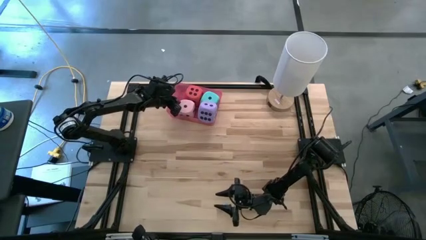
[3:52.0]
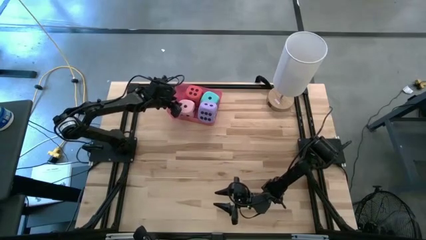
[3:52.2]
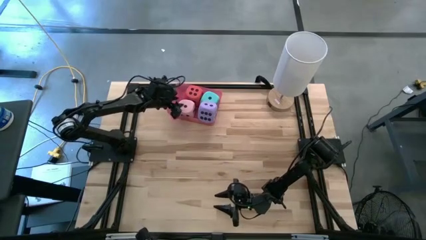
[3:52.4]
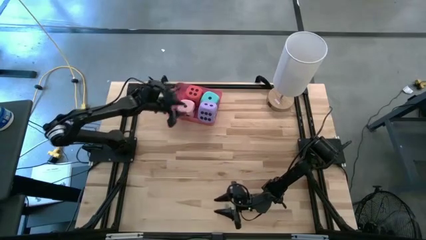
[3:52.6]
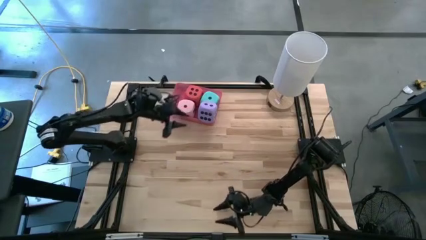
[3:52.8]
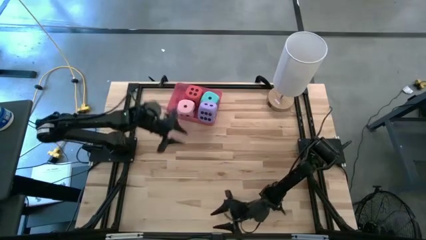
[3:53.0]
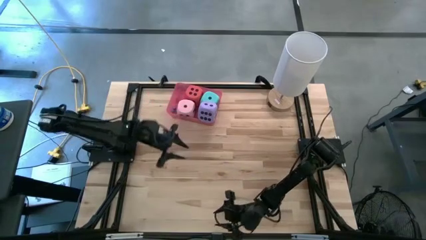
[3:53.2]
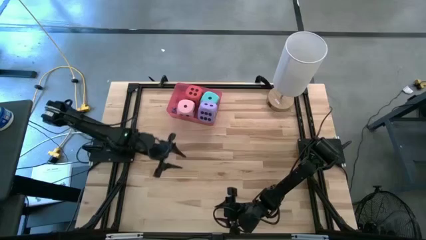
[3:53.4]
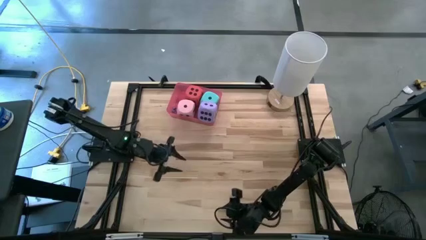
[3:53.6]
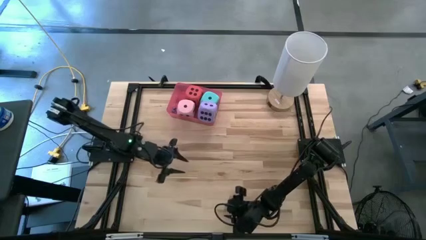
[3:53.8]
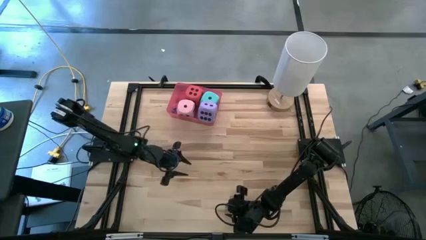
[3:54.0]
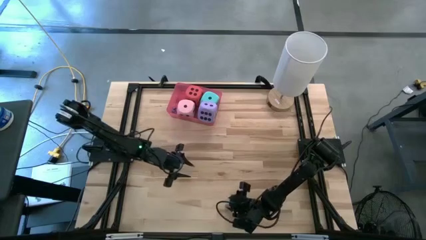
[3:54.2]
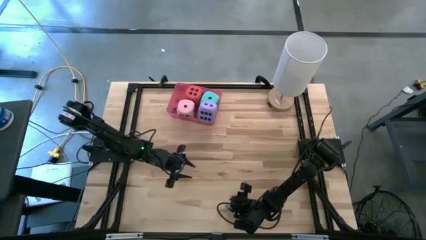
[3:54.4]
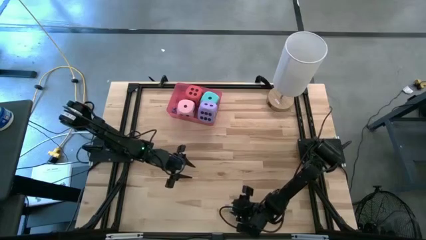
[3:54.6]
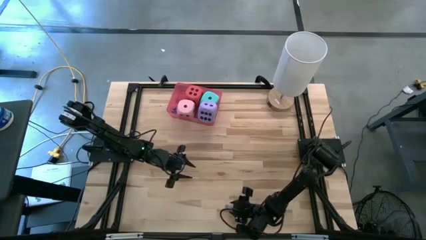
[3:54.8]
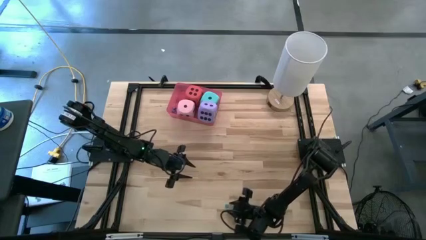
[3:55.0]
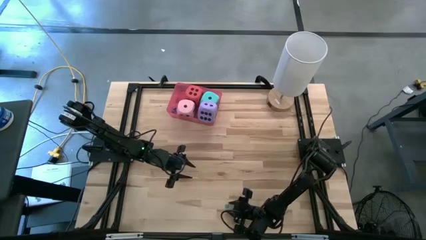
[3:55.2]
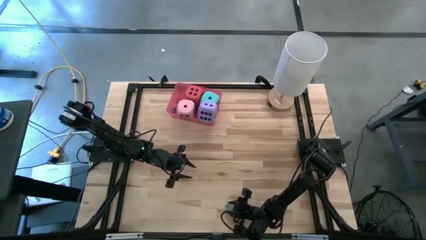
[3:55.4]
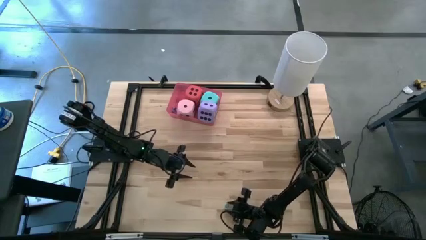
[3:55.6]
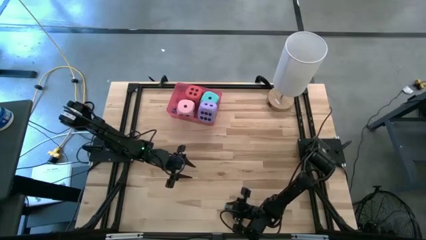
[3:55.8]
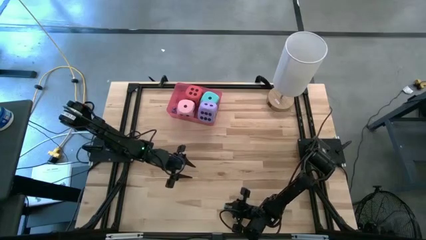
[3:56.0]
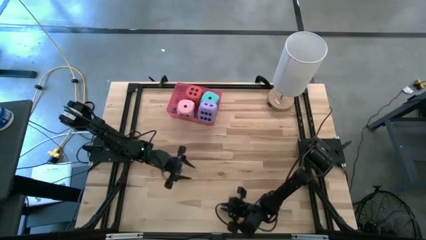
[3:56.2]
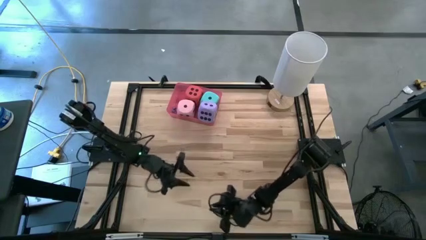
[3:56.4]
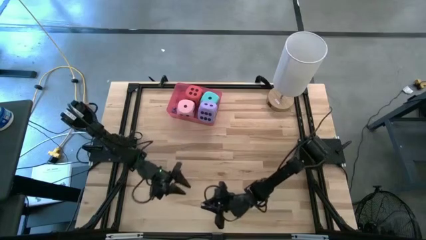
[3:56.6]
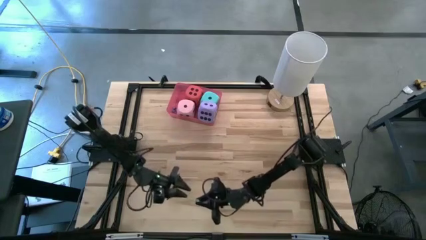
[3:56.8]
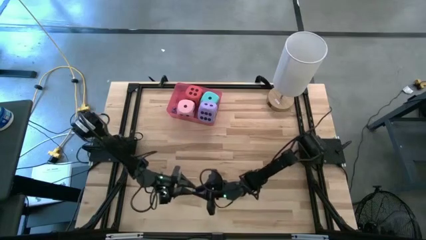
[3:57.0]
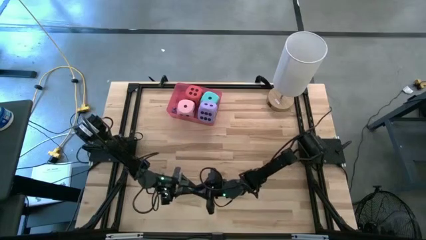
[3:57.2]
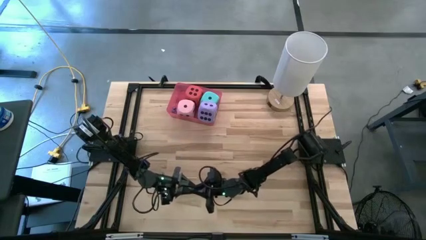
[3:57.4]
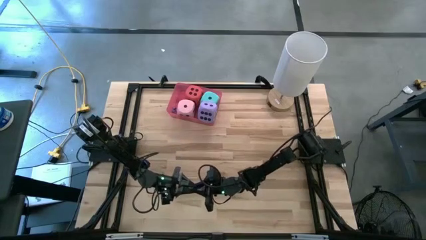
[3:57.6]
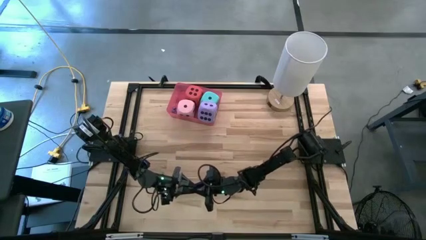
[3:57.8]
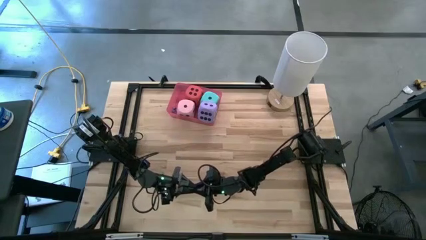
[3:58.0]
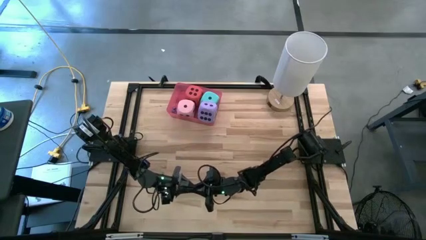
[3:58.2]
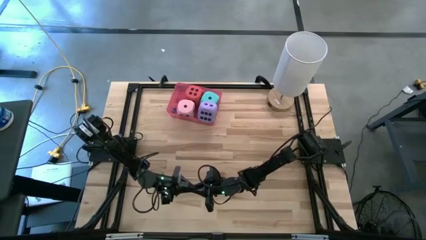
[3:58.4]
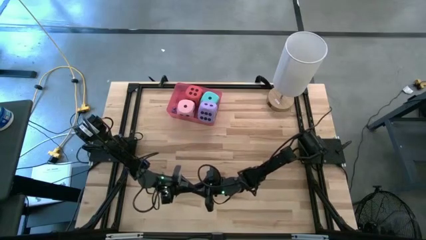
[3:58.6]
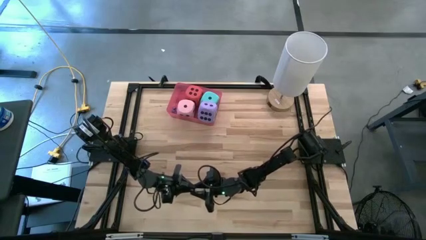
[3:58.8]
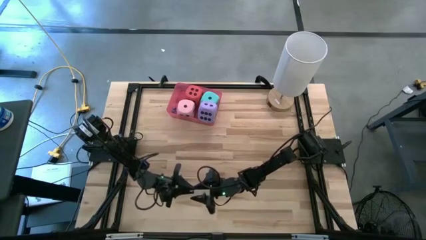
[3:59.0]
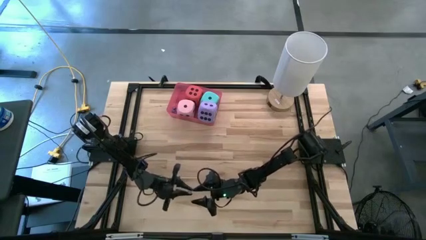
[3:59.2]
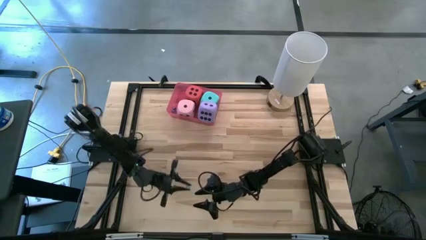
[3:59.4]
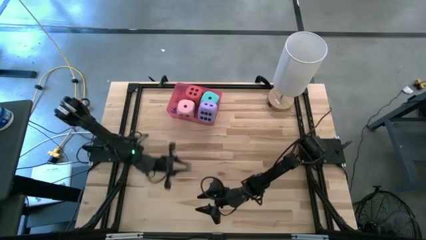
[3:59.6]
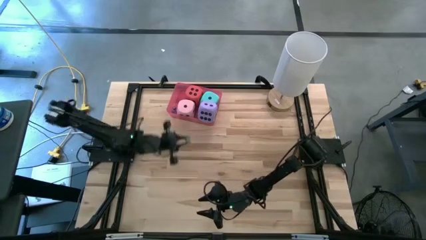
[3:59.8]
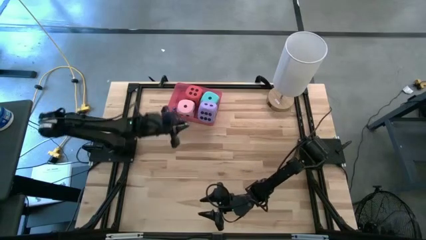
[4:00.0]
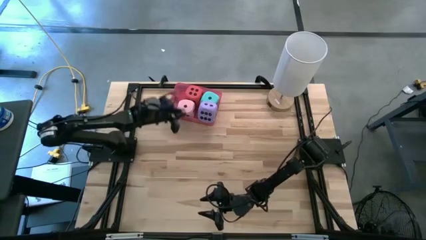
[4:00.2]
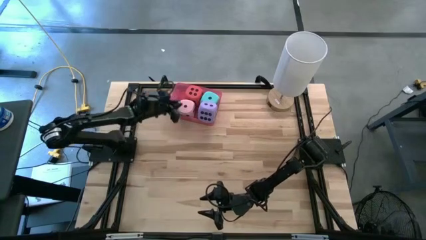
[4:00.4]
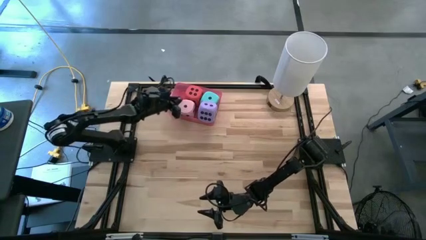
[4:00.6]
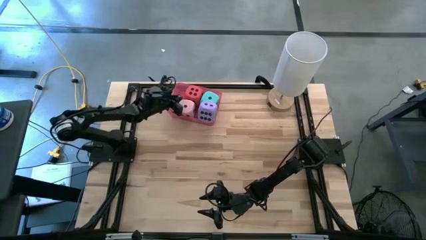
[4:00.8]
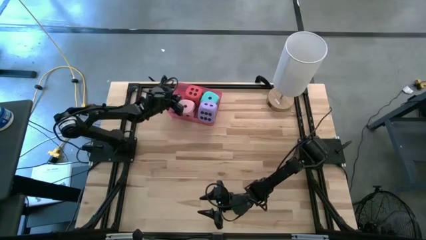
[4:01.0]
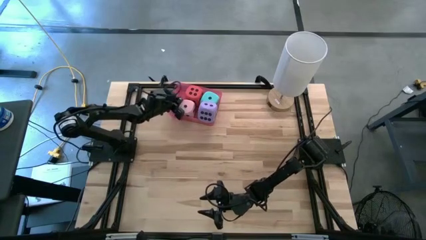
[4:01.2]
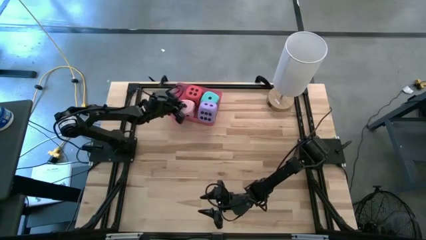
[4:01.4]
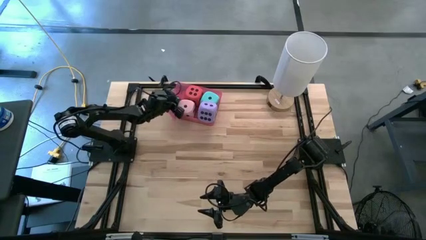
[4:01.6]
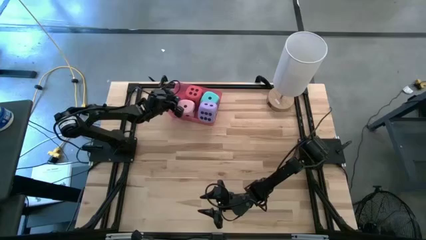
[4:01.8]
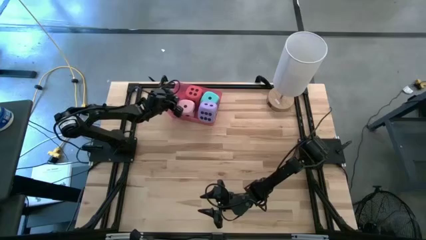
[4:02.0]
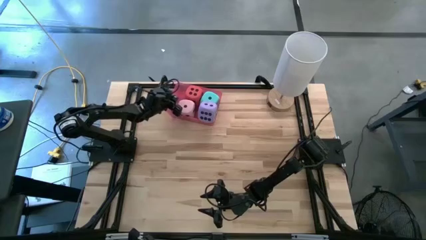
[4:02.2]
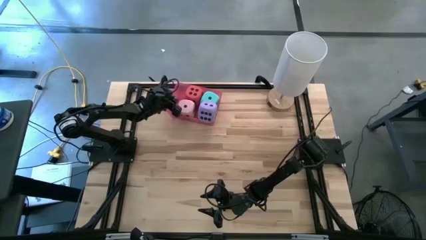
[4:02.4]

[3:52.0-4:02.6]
Task: Pick & Place Dice
Put the small blue dice into the pink bin
